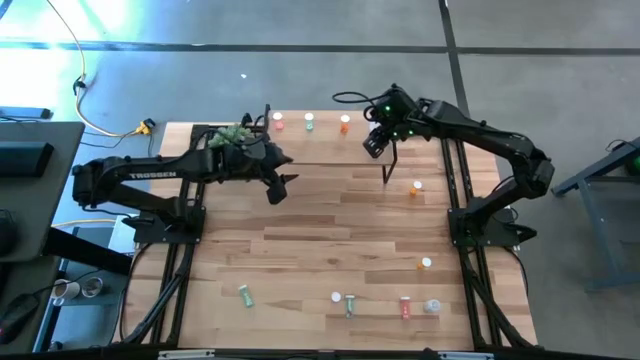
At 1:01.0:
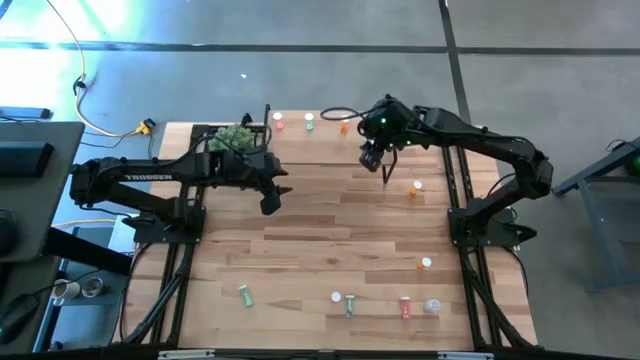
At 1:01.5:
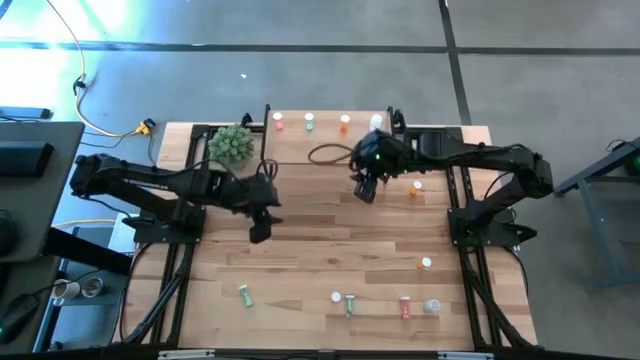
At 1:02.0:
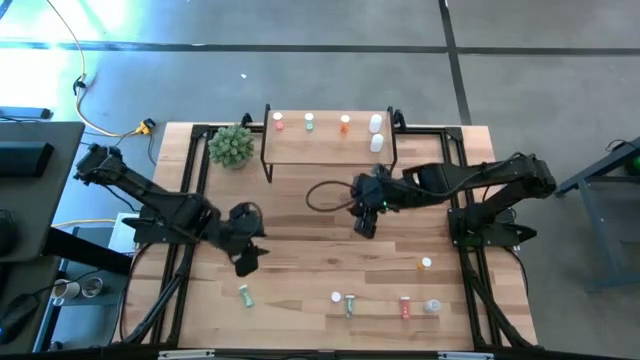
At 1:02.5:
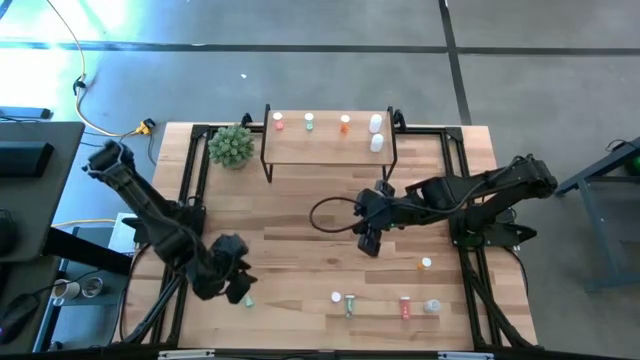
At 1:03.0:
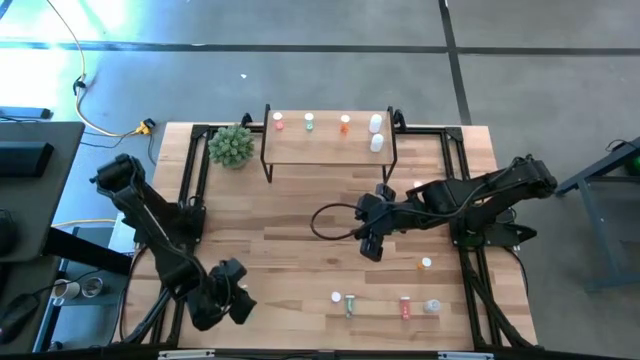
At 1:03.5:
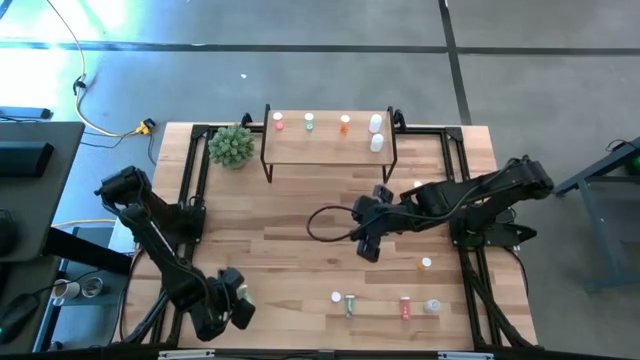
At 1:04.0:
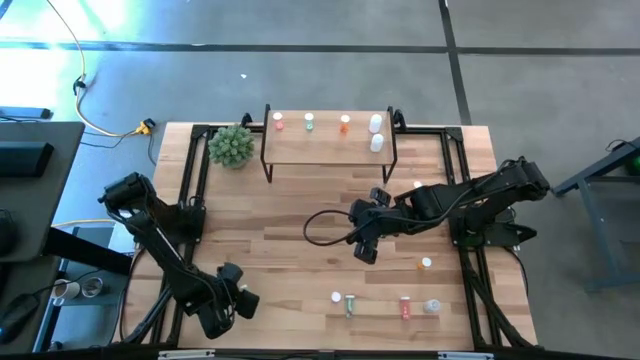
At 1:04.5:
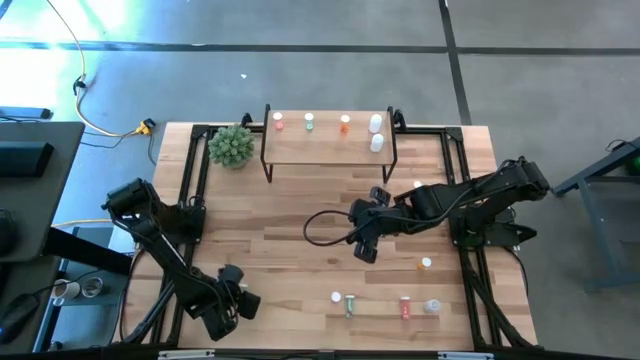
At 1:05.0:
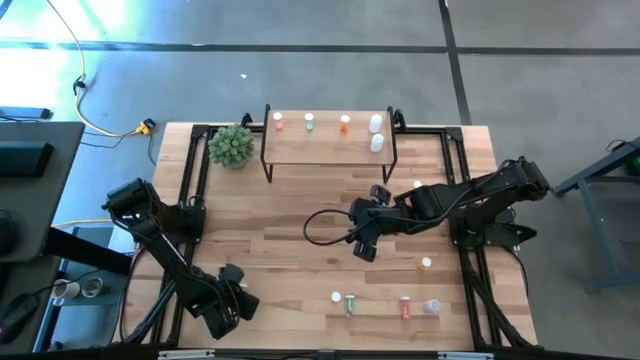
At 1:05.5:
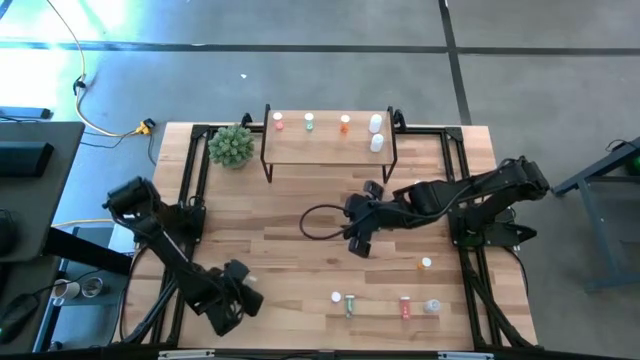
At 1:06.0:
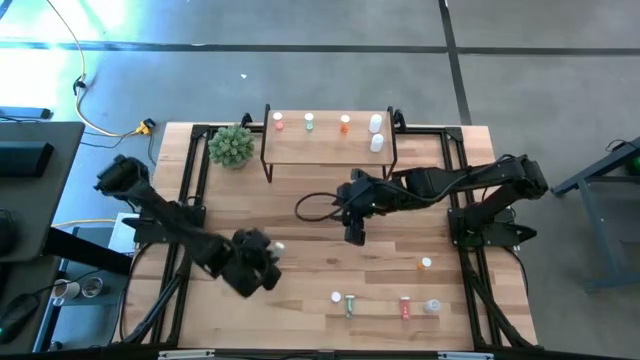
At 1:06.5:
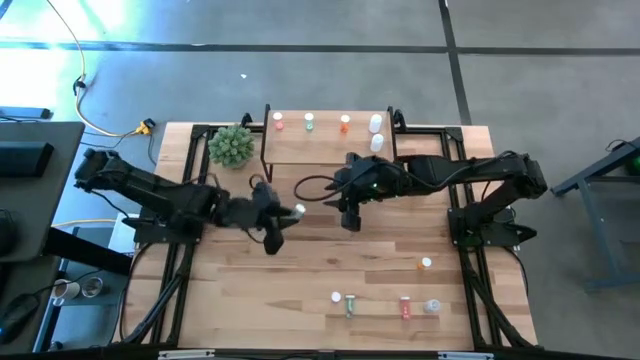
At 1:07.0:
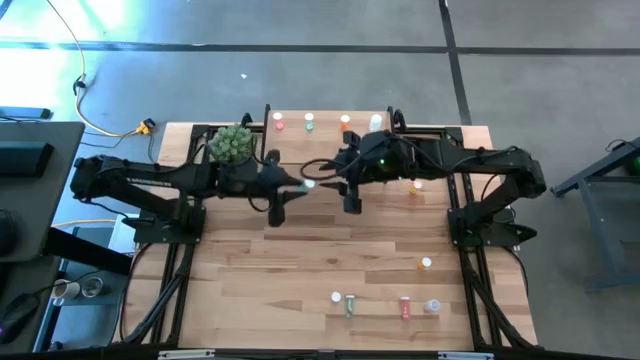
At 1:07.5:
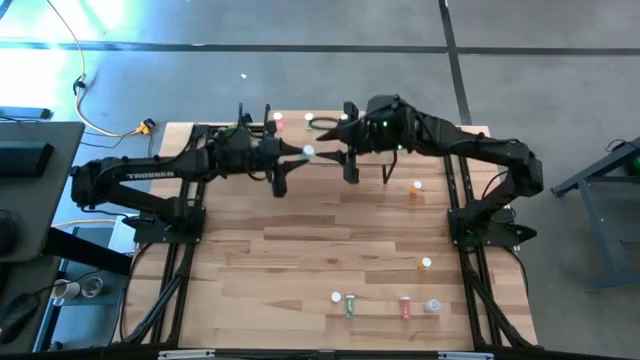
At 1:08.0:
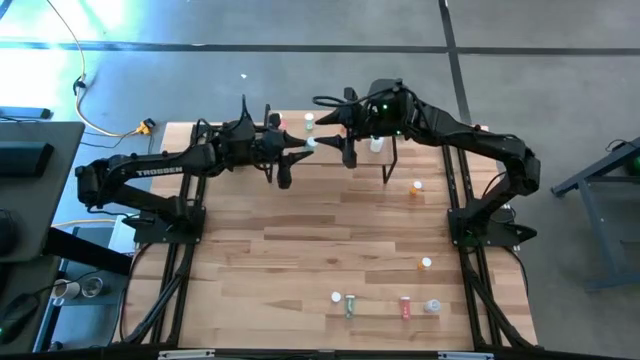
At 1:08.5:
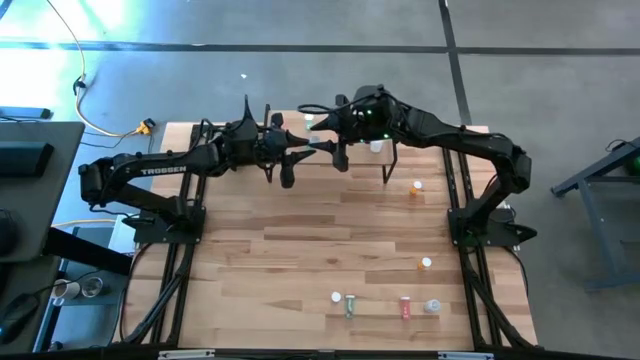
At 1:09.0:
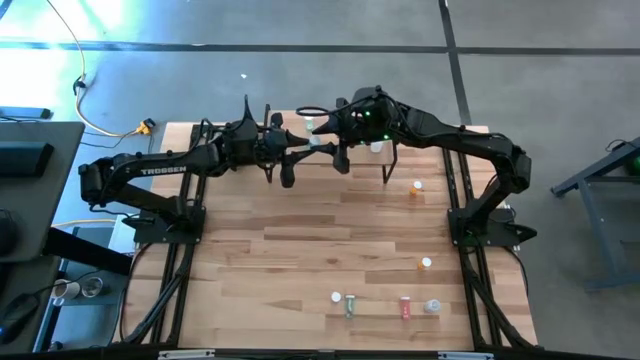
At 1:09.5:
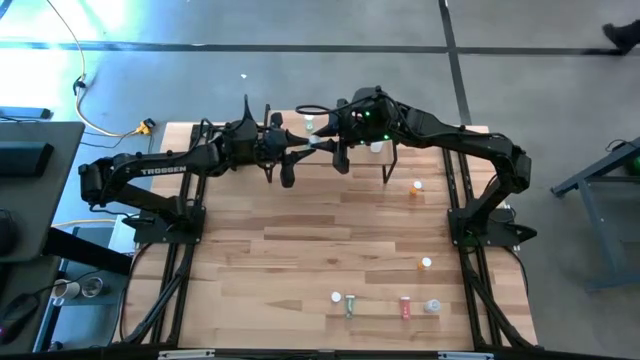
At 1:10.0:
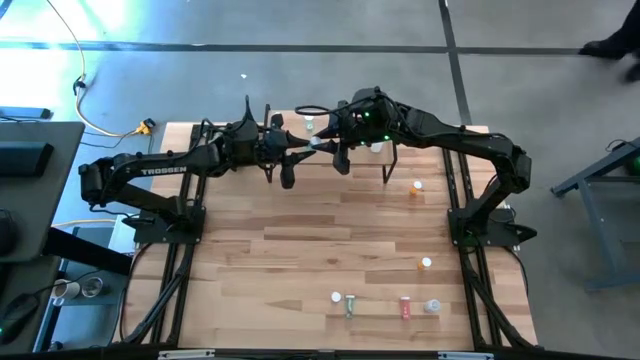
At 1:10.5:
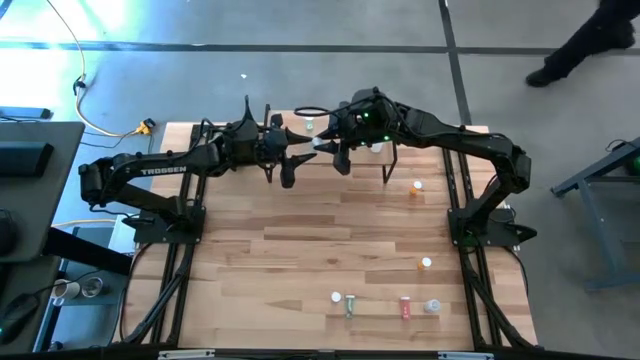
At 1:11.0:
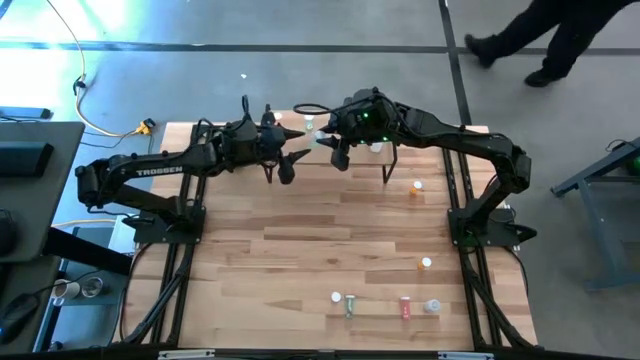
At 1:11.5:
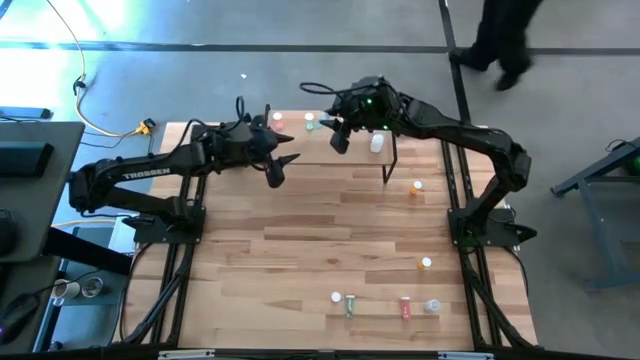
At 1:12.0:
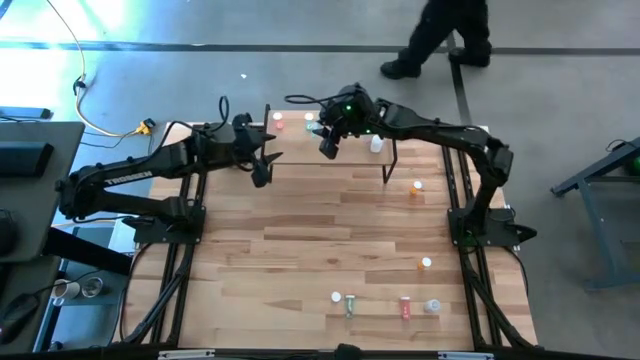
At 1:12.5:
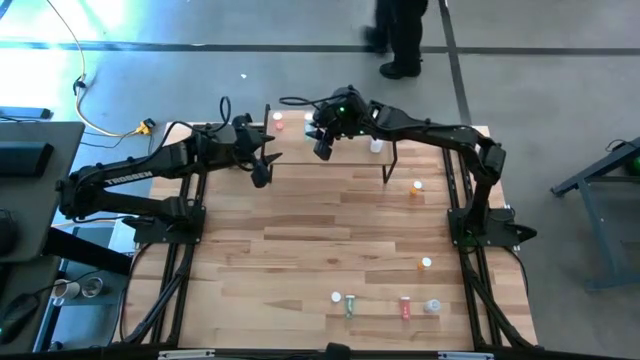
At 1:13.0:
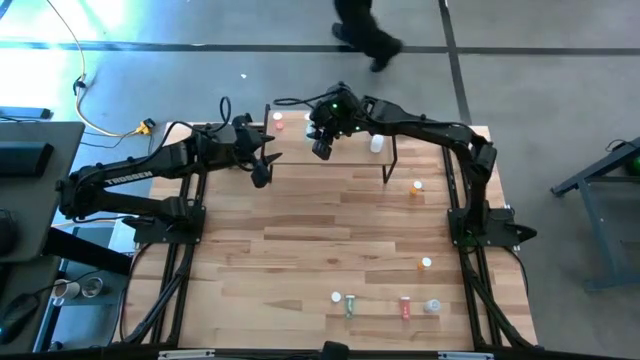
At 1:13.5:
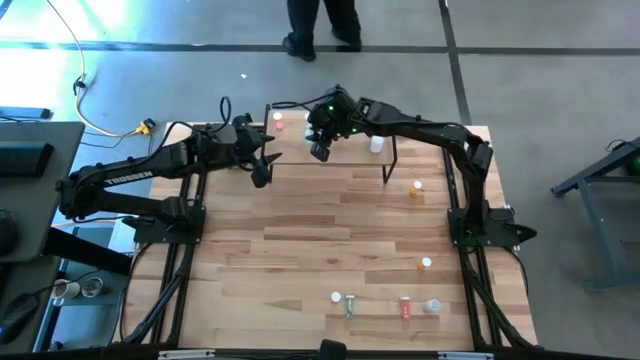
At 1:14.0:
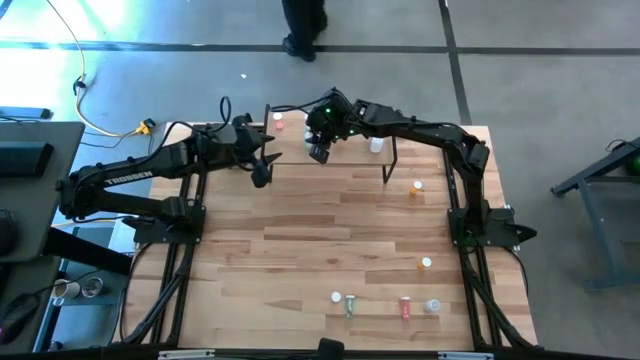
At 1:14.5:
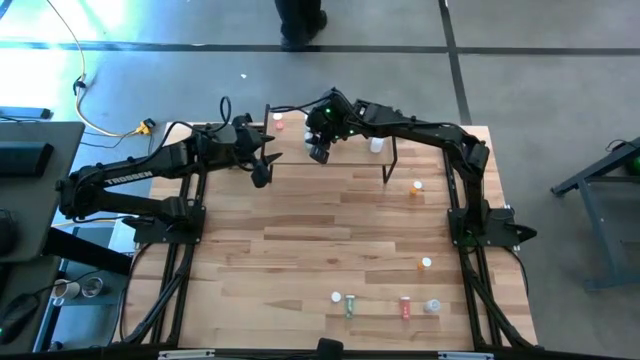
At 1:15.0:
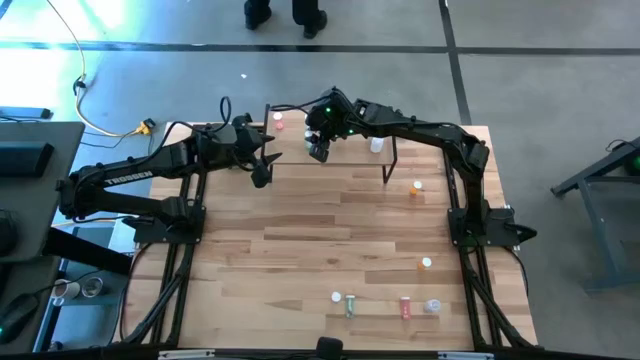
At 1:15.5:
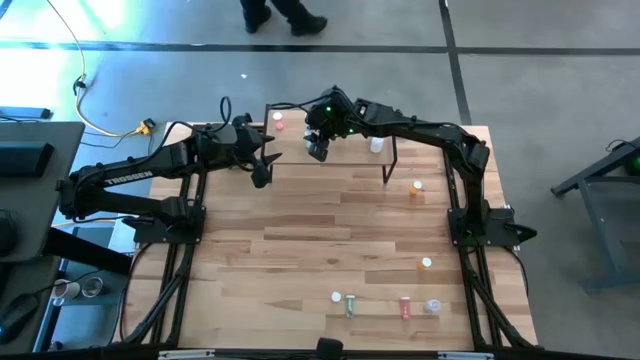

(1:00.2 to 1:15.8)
Task: Pick and place medicine bottles onto shelf by color
Put the left blue pill bottle on the shelf aligned with the other blue pill bottle

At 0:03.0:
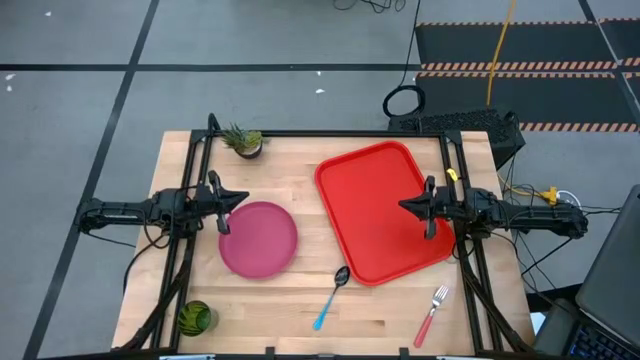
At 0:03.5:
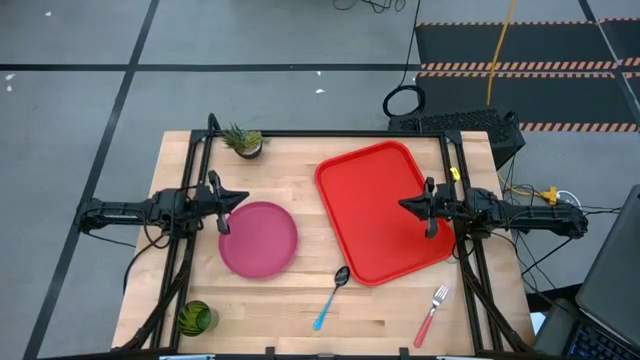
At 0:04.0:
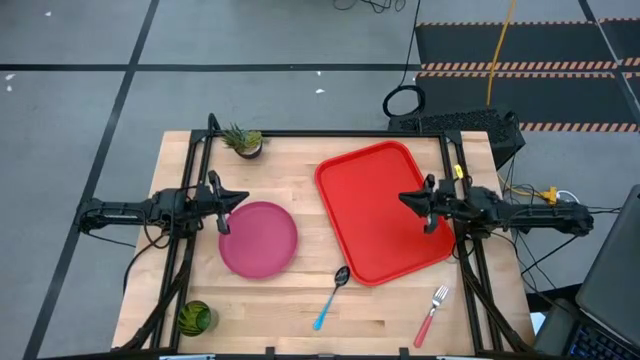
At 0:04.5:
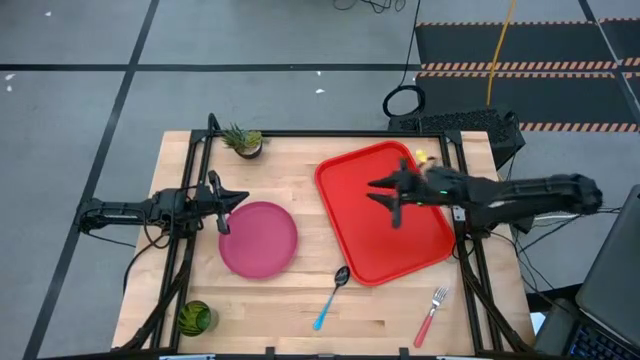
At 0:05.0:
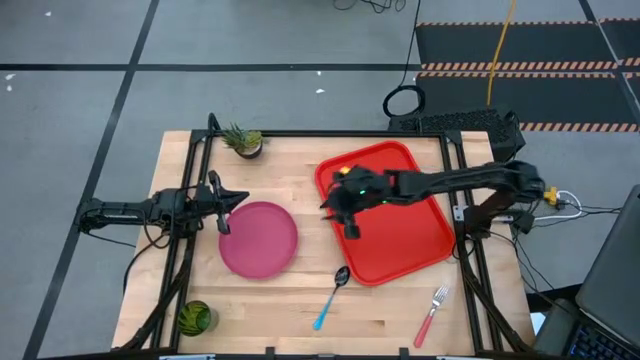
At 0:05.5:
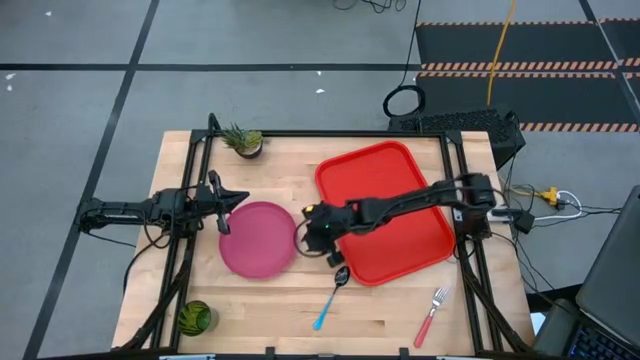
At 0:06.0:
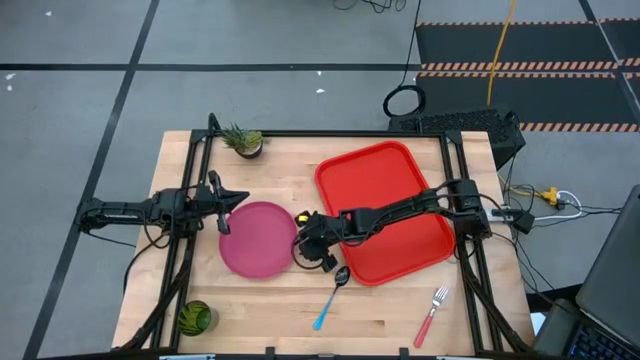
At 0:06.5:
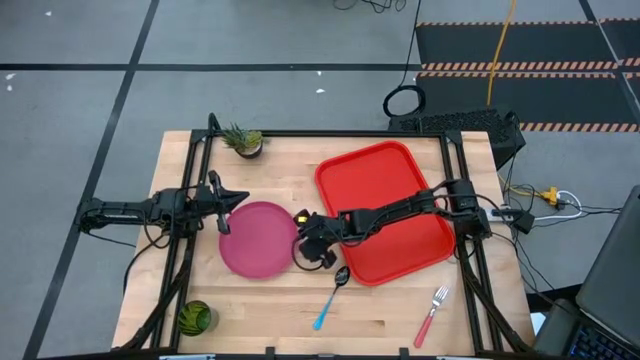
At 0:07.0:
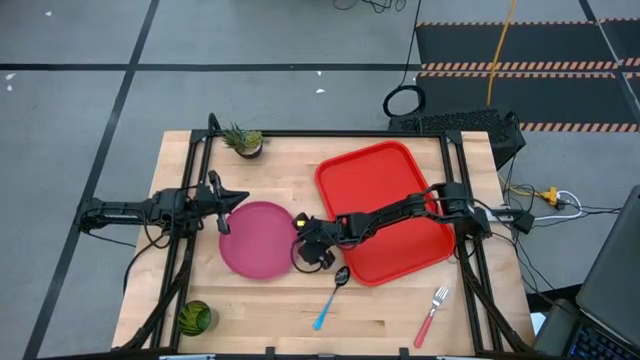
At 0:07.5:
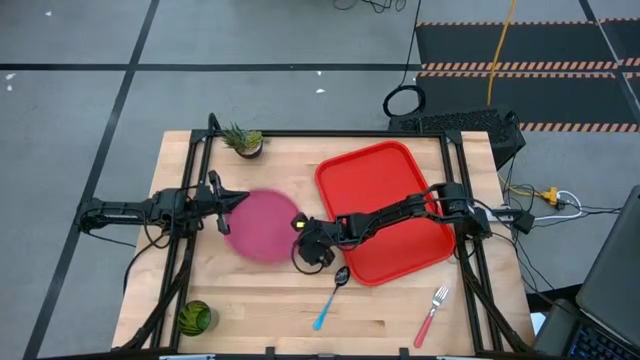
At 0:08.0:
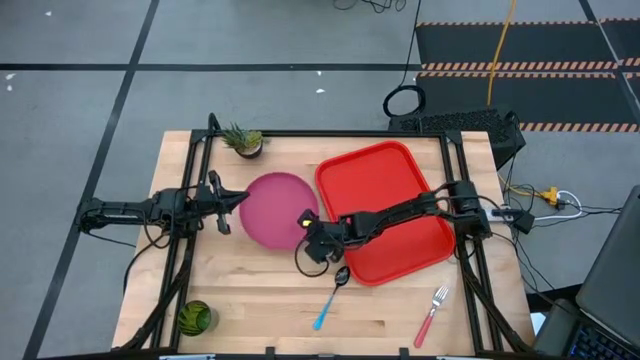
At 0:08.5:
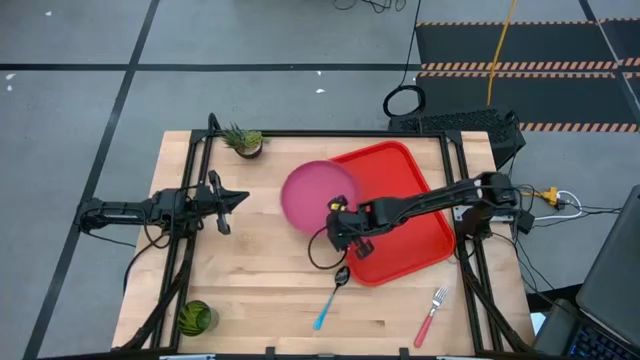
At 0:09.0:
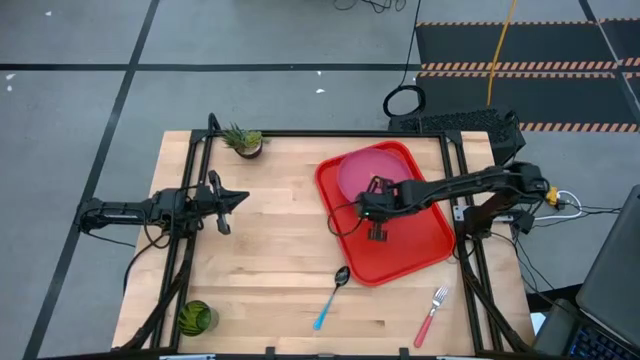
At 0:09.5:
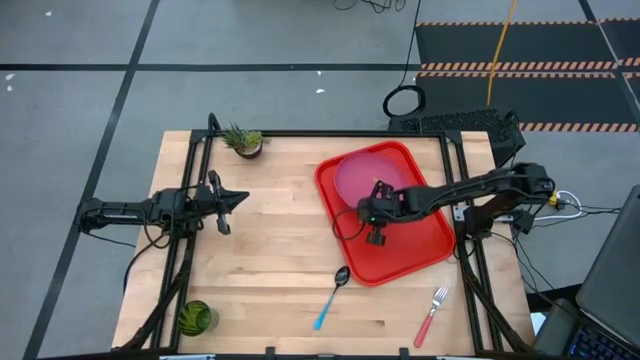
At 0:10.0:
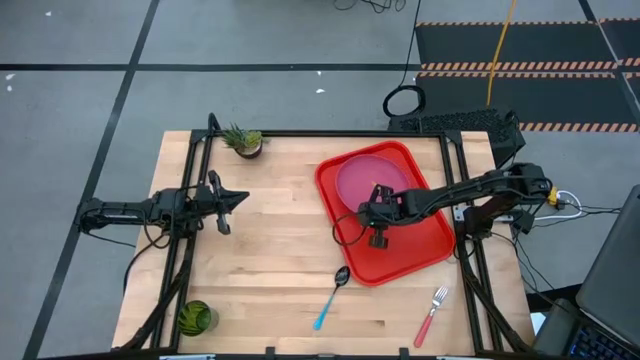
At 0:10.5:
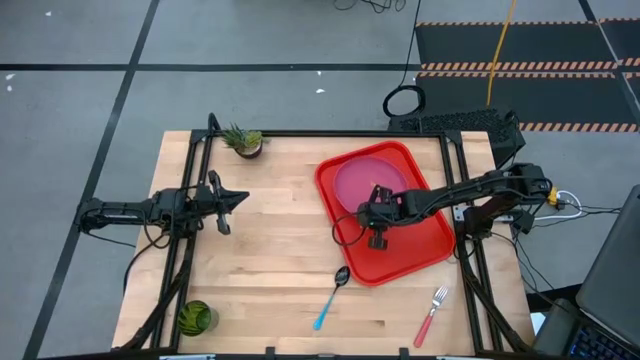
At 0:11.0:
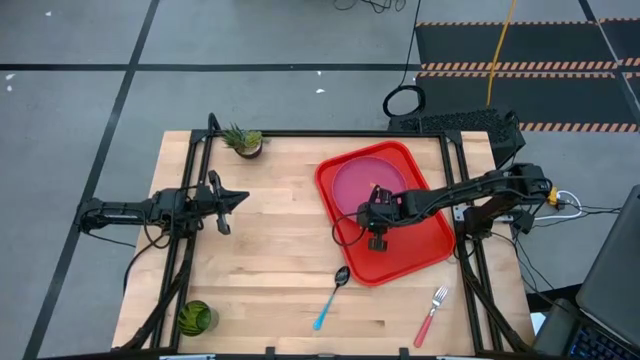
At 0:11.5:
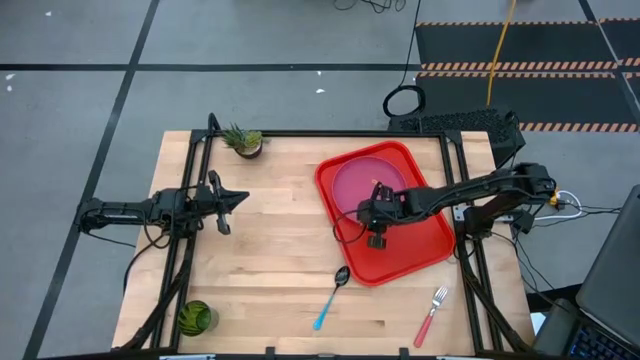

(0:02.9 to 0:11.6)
Task: Pick and place plate/cup/fork/spoon on tray
Put the pink plate on the orange tray
